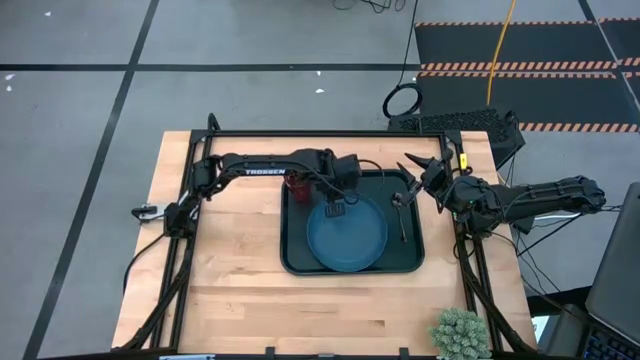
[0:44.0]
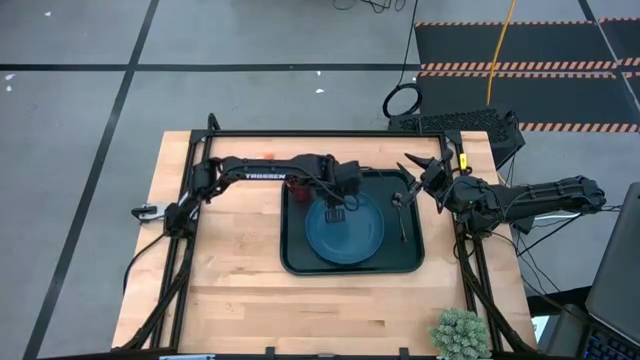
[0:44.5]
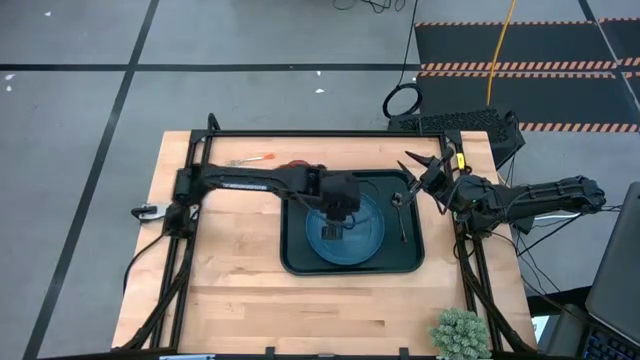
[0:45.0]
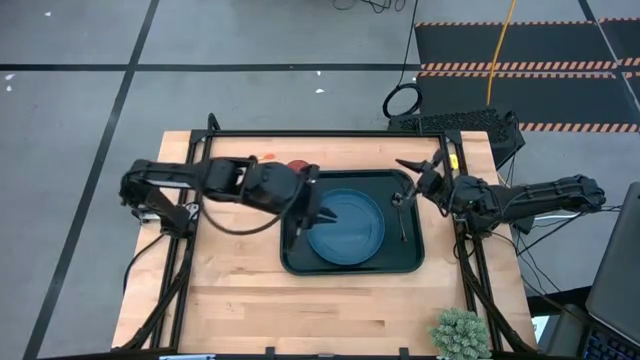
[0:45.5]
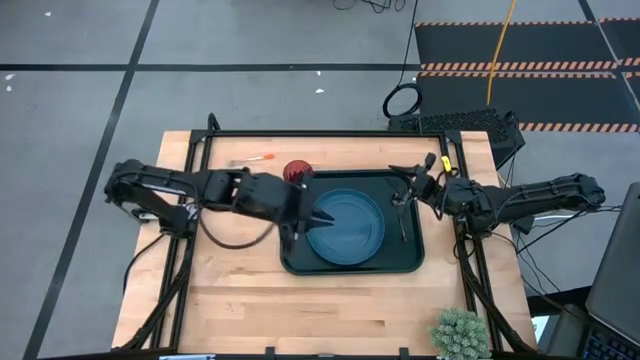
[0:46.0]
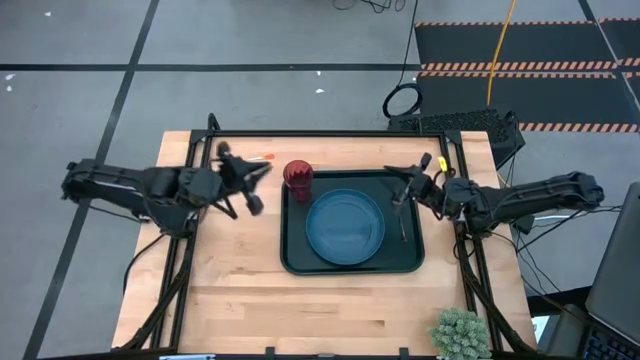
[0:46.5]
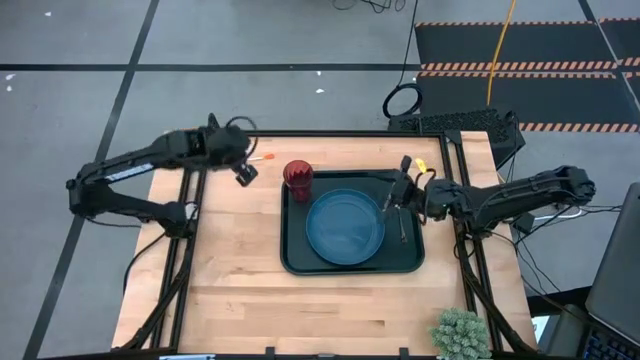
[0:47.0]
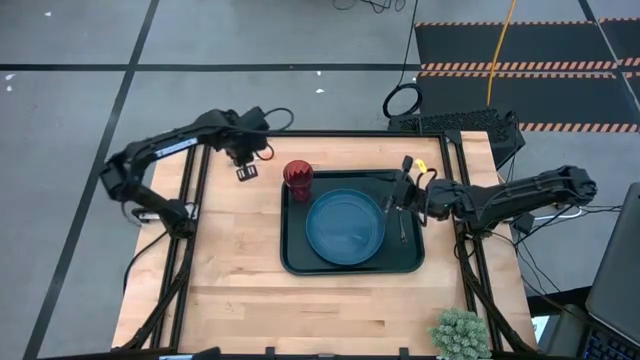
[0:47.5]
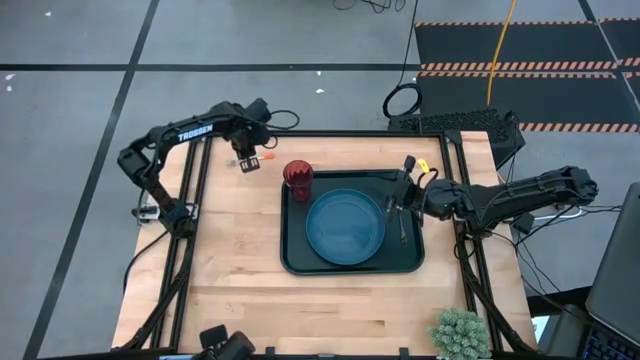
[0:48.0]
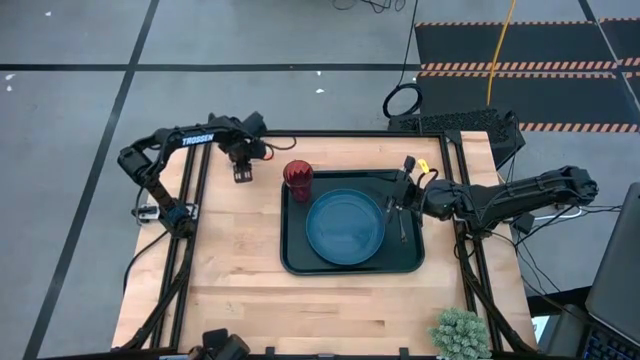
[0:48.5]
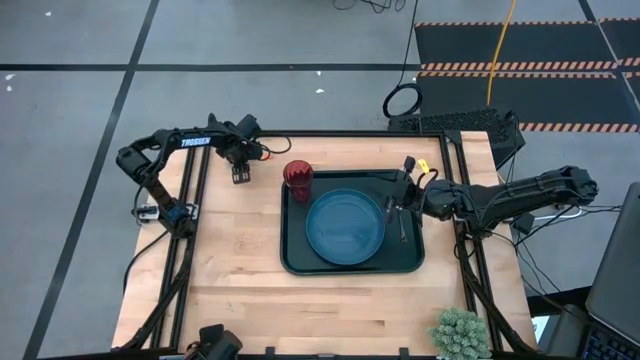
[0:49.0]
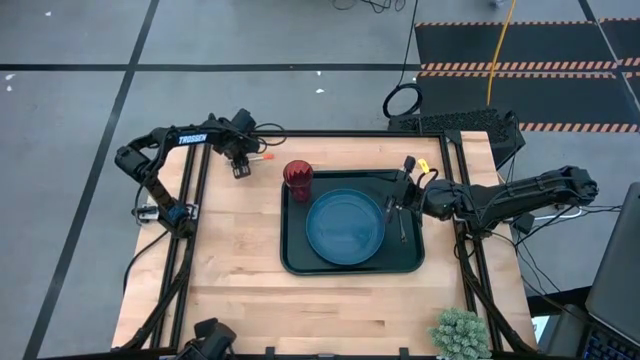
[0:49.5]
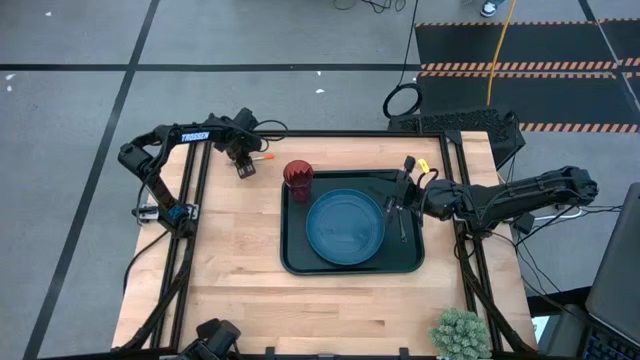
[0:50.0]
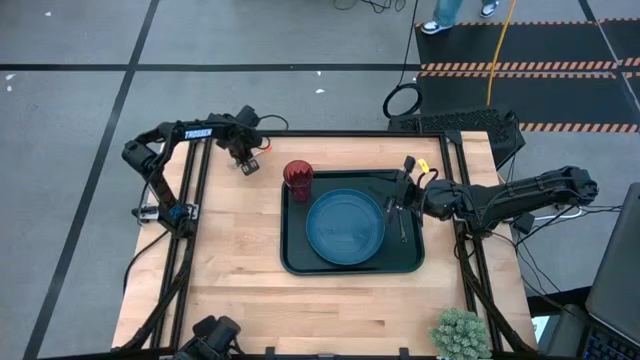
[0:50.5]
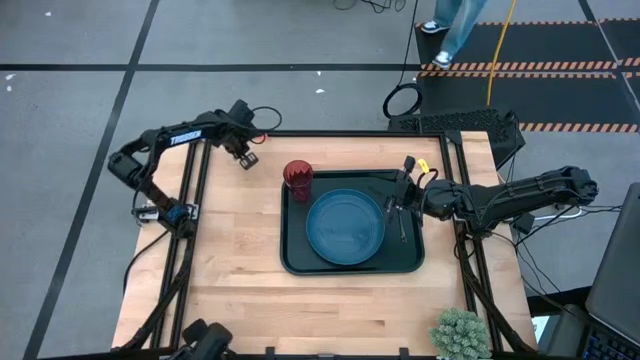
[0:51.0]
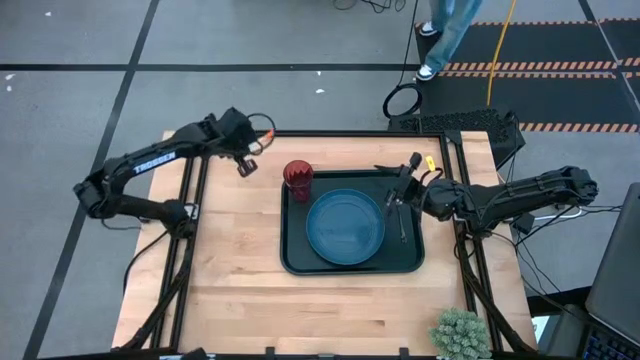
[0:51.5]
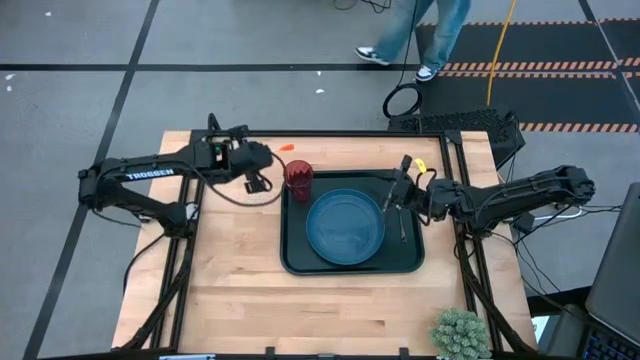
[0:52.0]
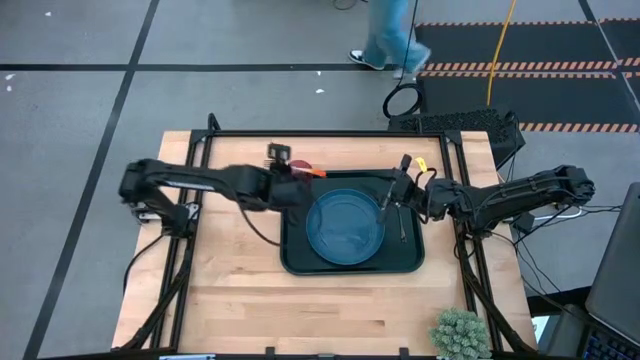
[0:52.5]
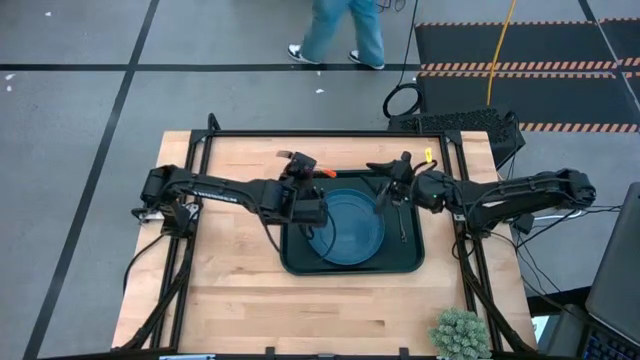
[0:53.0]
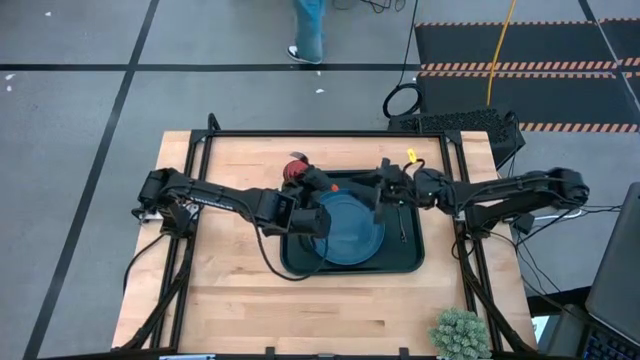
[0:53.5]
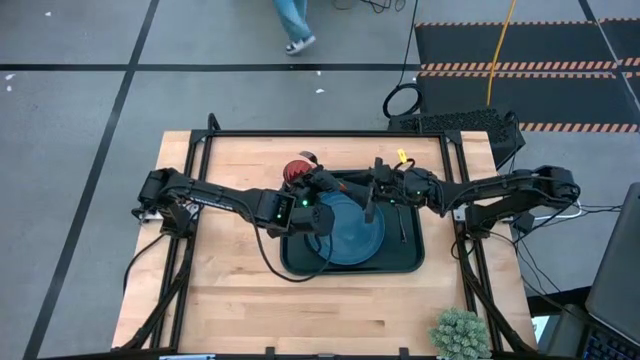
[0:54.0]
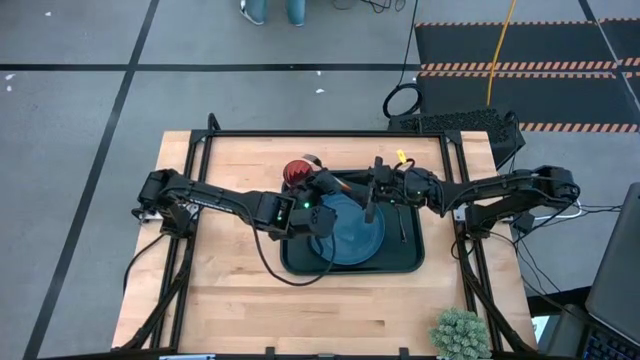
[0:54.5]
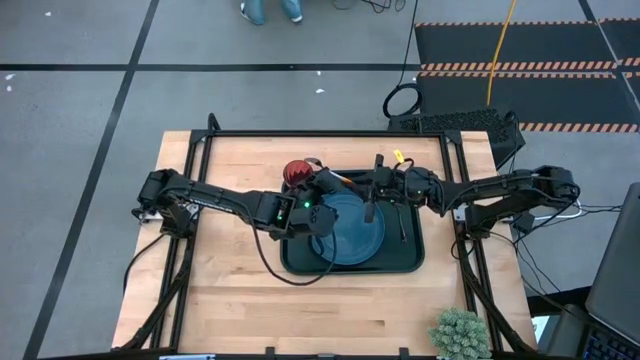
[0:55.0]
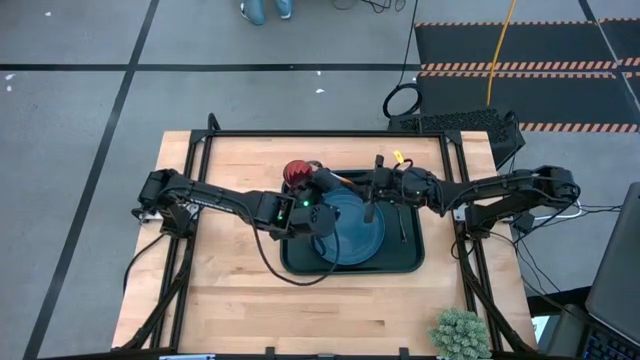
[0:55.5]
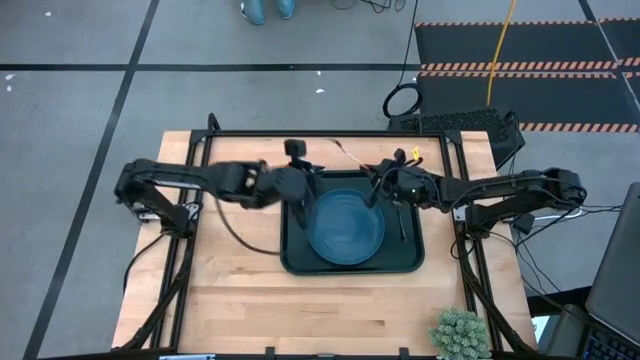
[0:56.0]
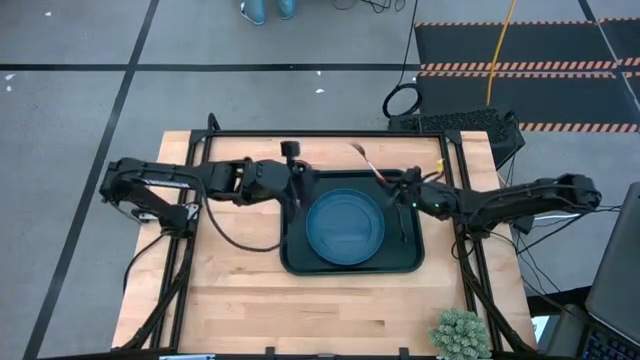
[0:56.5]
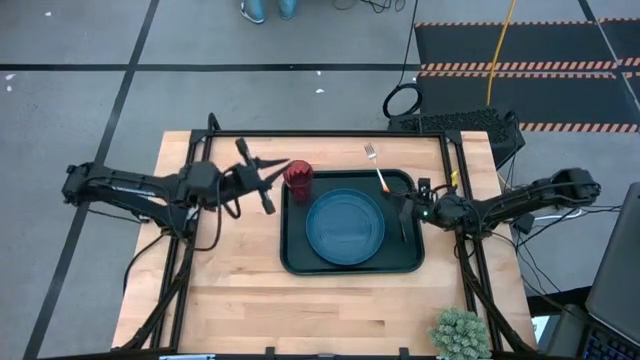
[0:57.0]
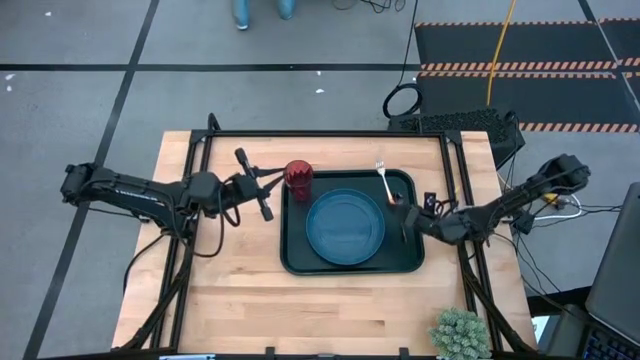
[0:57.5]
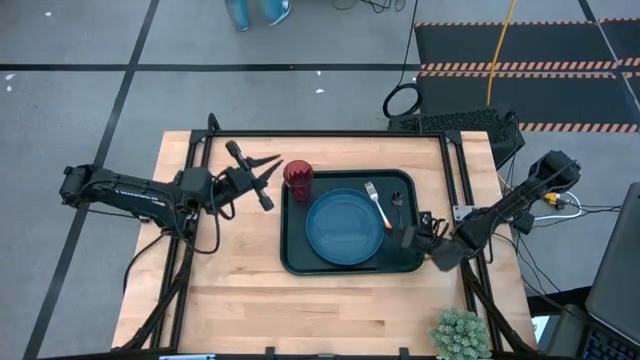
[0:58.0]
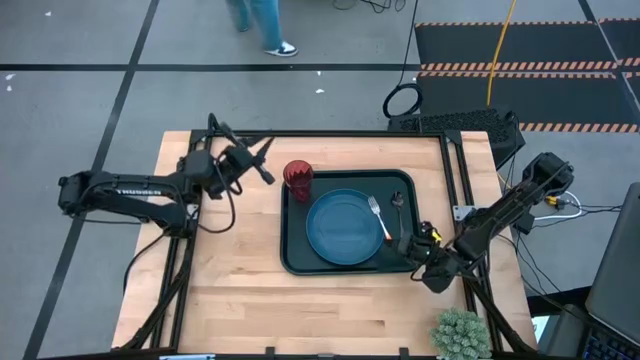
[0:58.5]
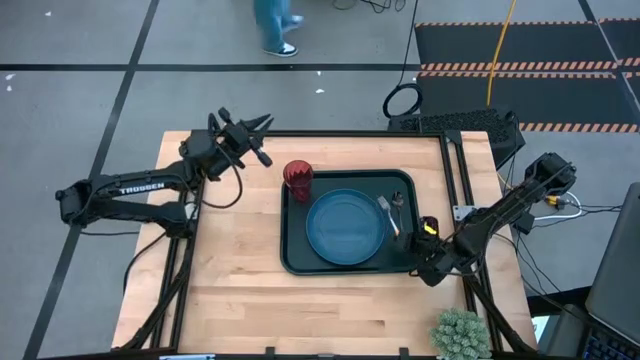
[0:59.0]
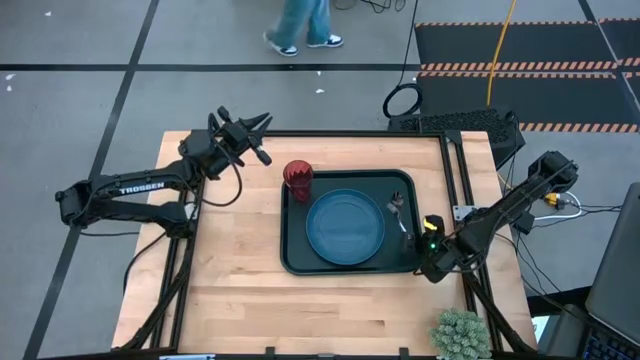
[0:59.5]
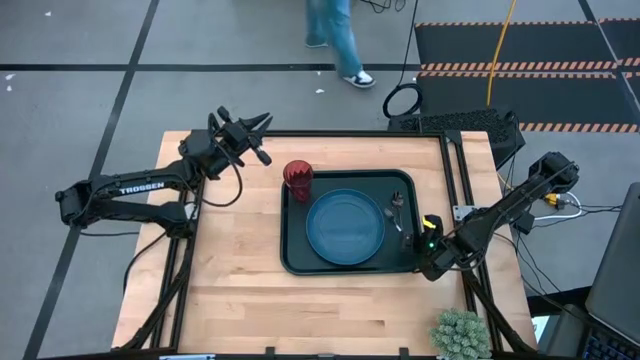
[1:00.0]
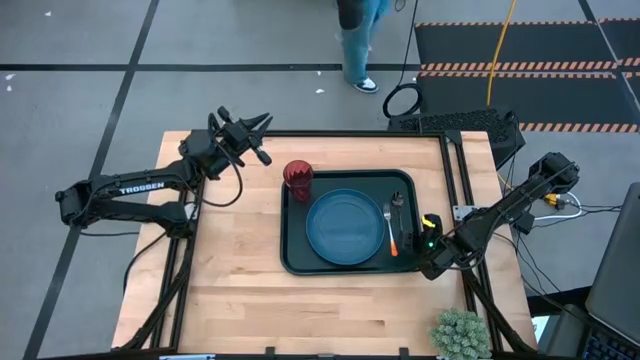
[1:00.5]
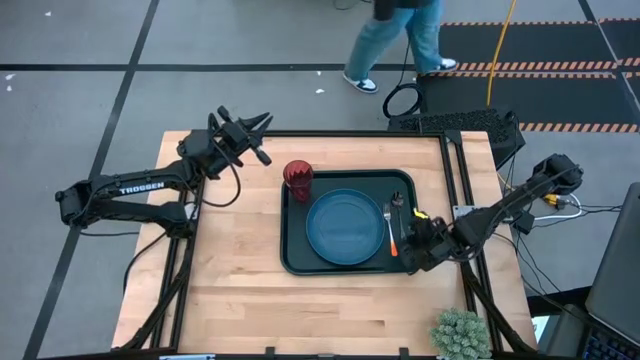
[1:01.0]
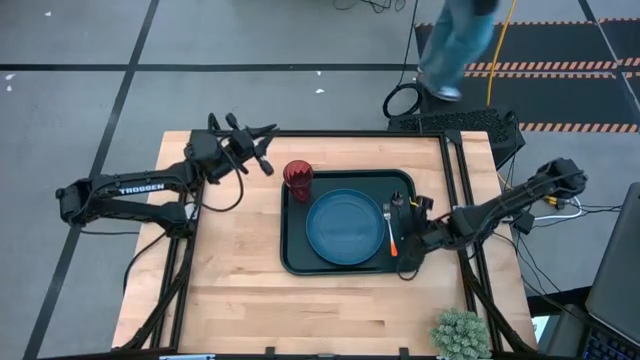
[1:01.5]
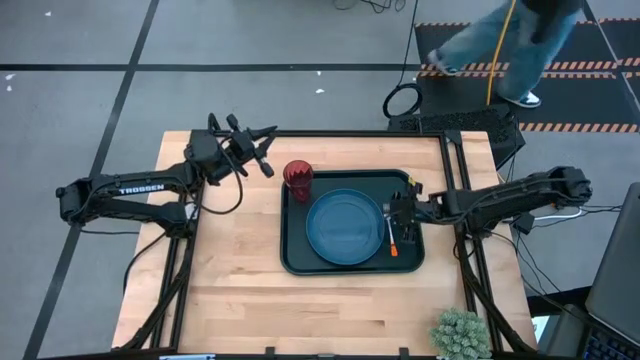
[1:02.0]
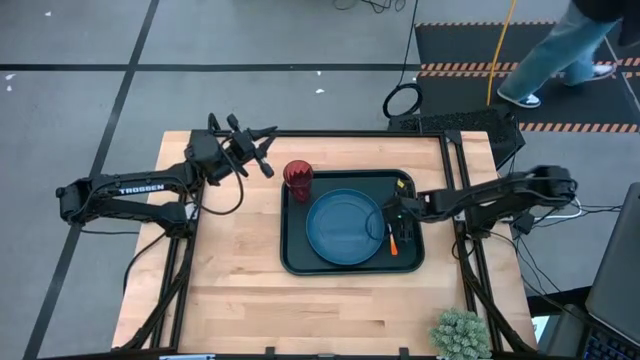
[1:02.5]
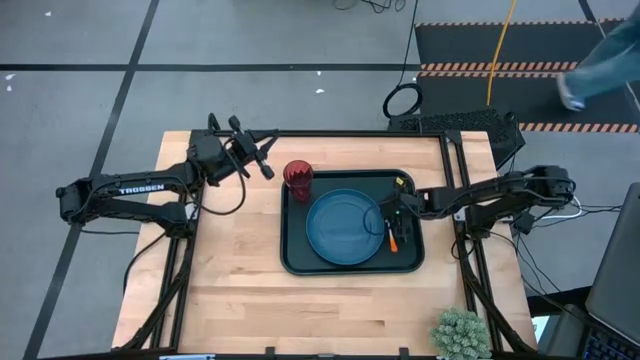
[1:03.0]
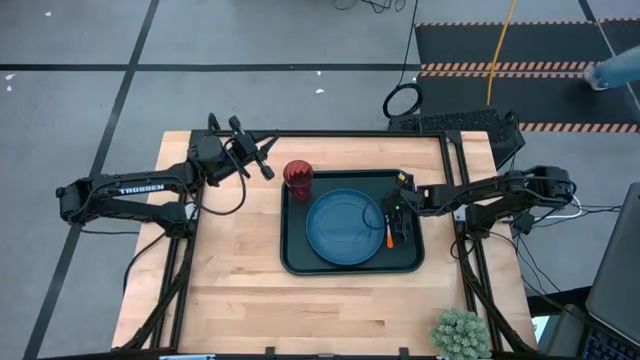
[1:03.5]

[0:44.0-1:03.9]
Task: Pick and place plate/cup/fork/spoon on tray
Put the orange fork to the right of the blue plate on the blue tray

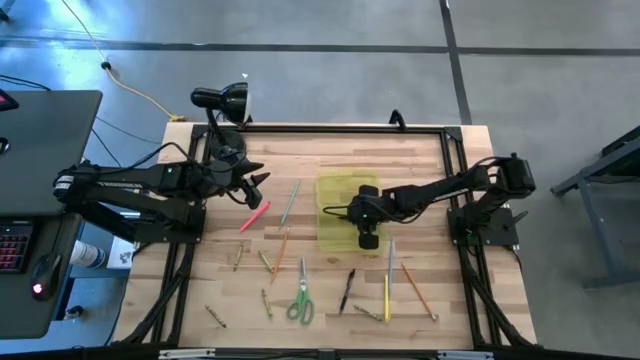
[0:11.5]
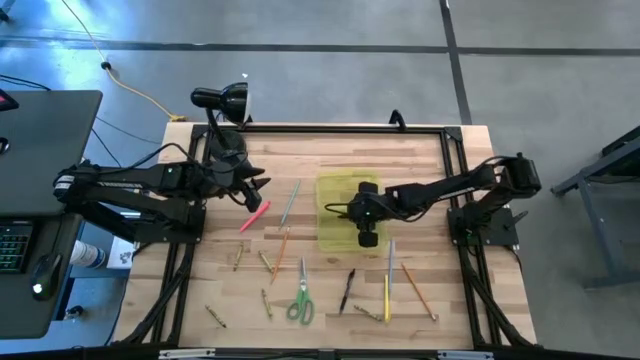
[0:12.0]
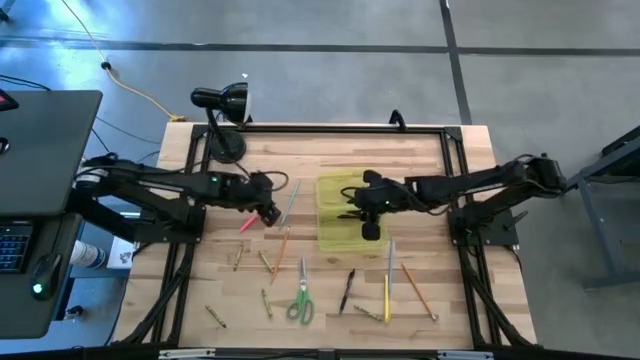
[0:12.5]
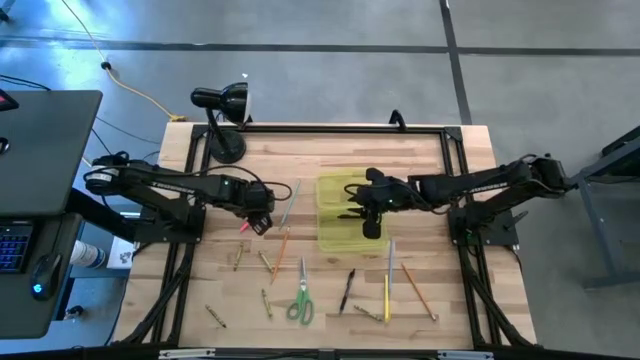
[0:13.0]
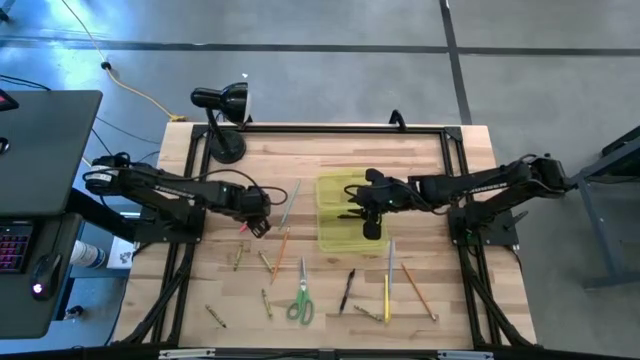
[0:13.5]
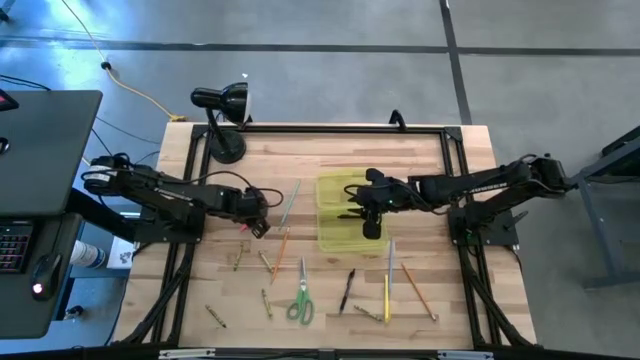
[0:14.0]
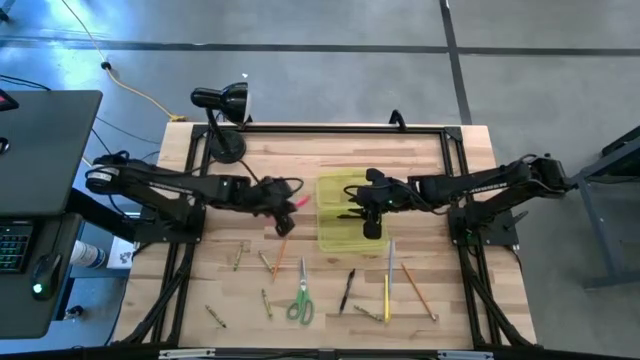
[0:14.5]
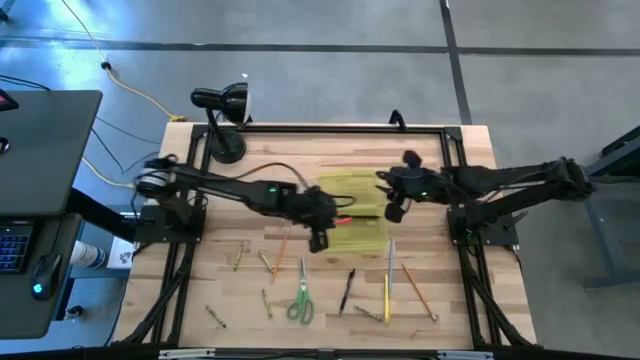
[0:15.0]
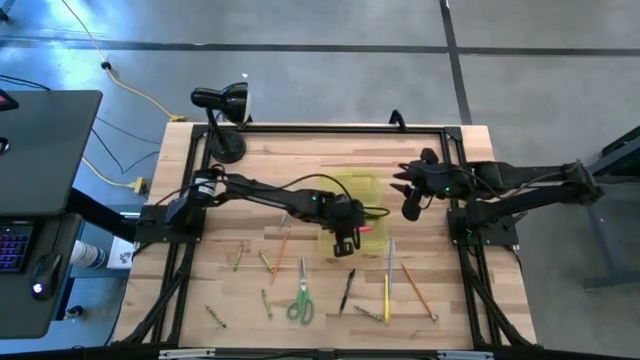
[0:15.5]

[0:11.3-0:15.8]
Task: Pick & place school supplies into a supply box
Put the pink pen into the yellow supply box
